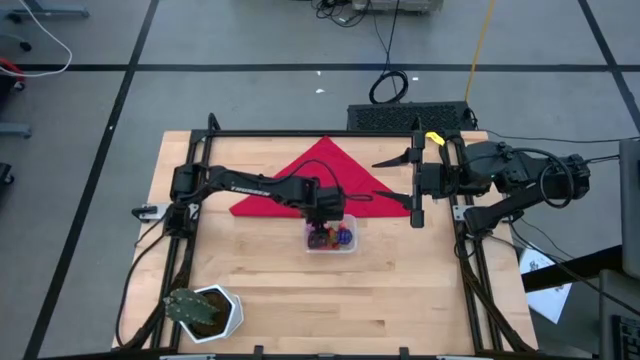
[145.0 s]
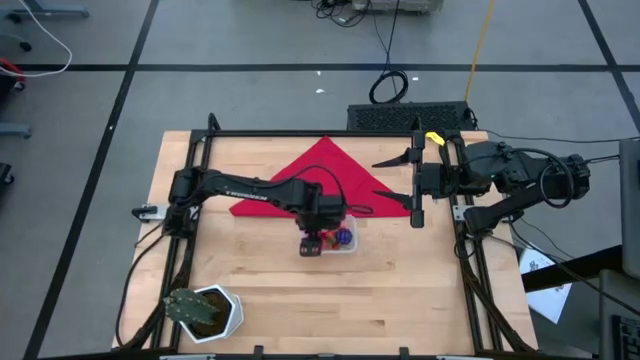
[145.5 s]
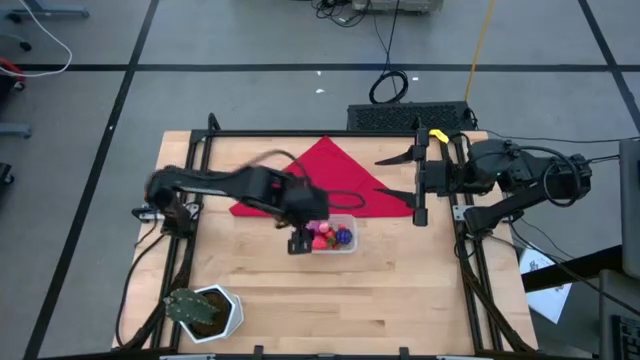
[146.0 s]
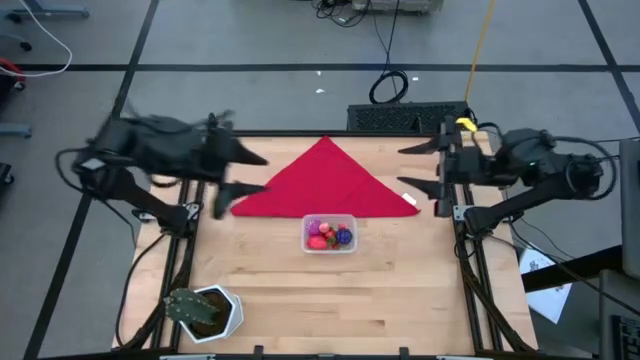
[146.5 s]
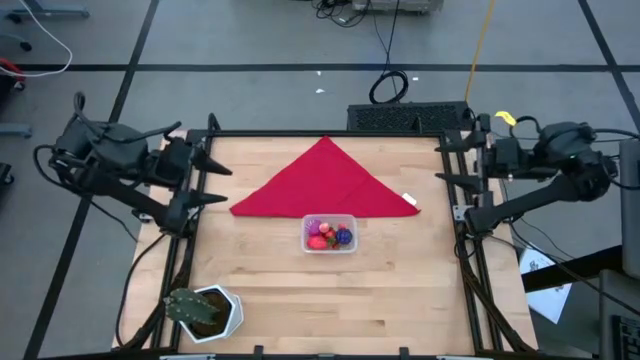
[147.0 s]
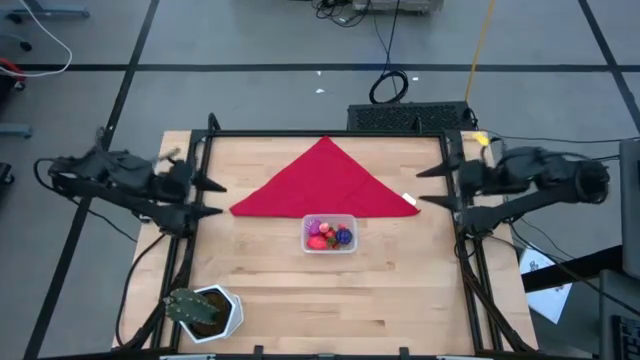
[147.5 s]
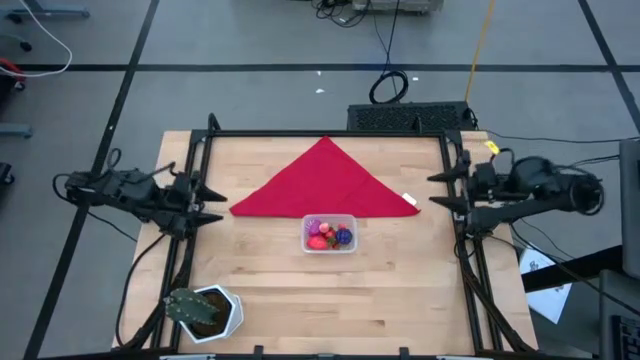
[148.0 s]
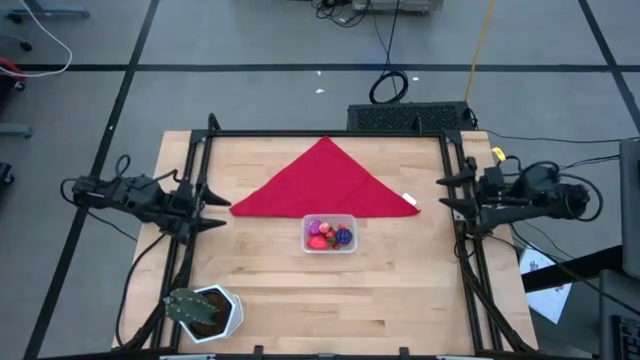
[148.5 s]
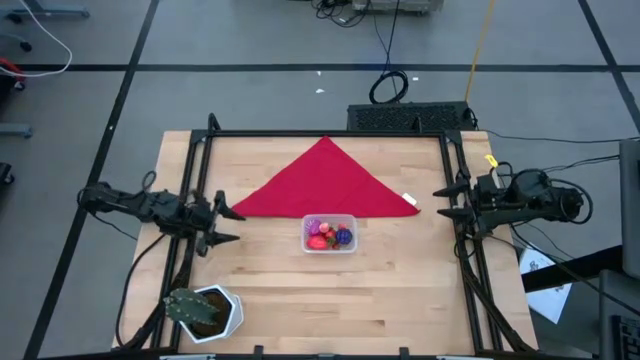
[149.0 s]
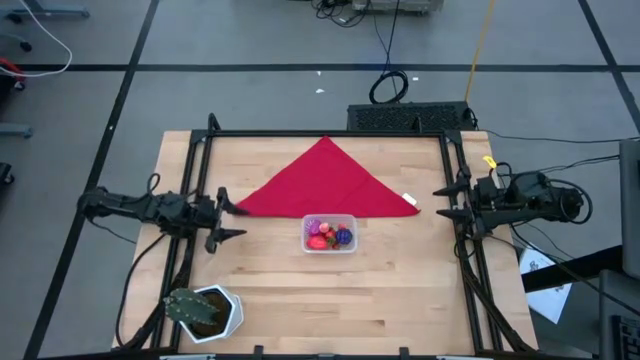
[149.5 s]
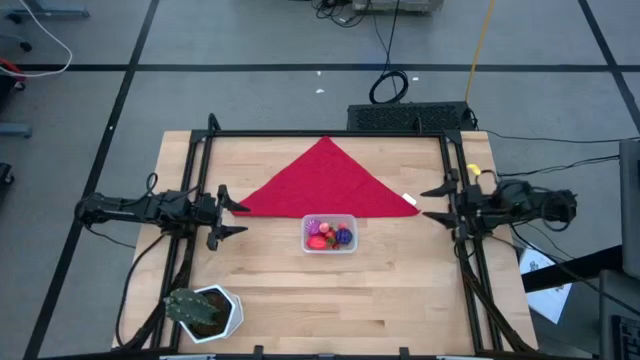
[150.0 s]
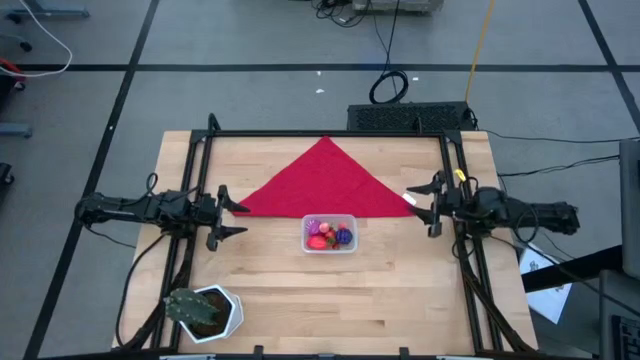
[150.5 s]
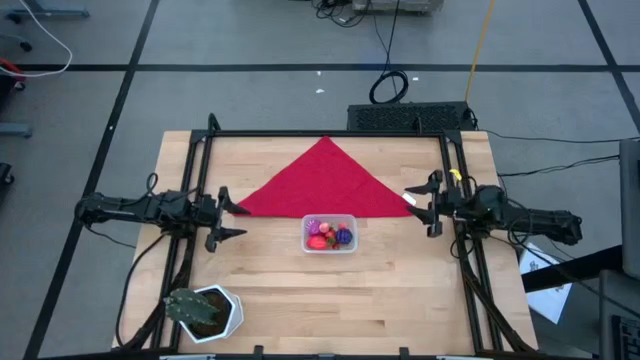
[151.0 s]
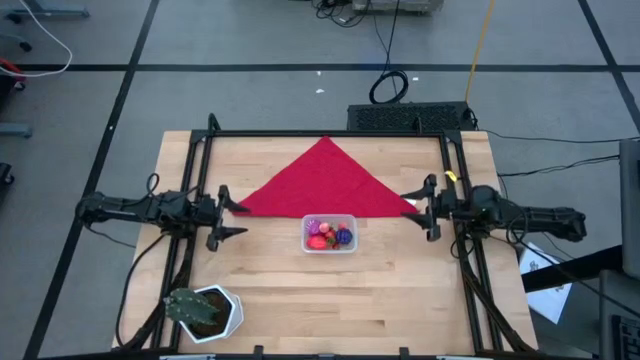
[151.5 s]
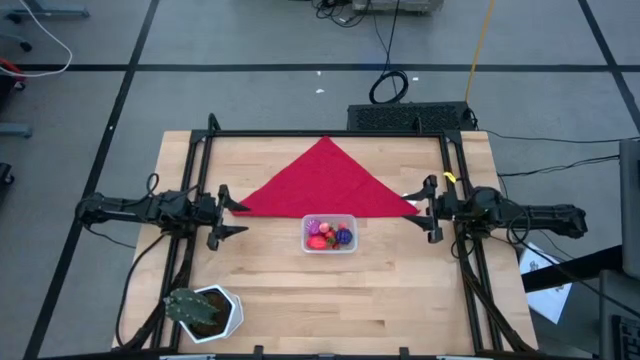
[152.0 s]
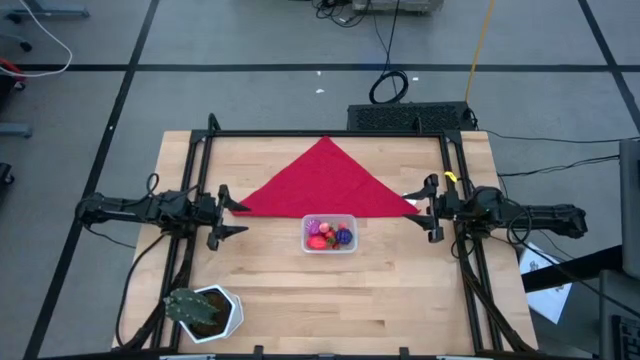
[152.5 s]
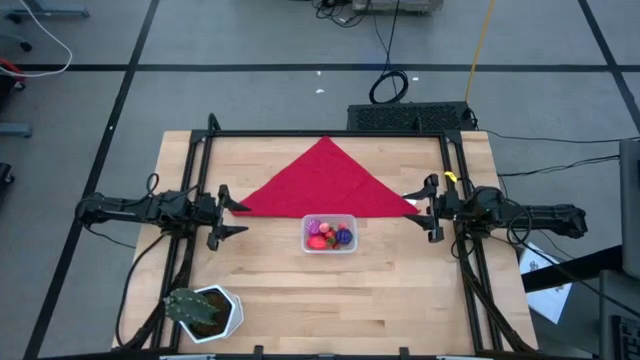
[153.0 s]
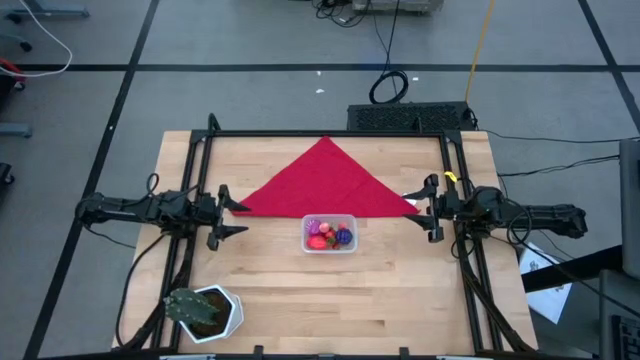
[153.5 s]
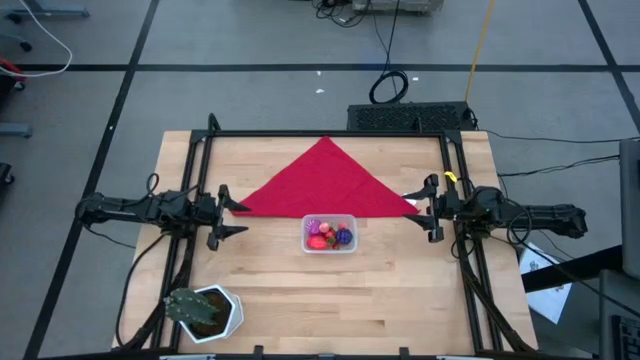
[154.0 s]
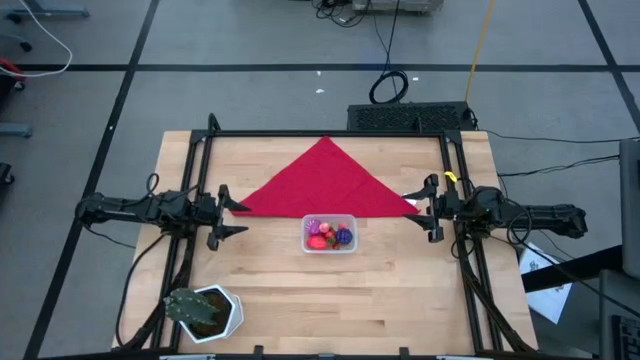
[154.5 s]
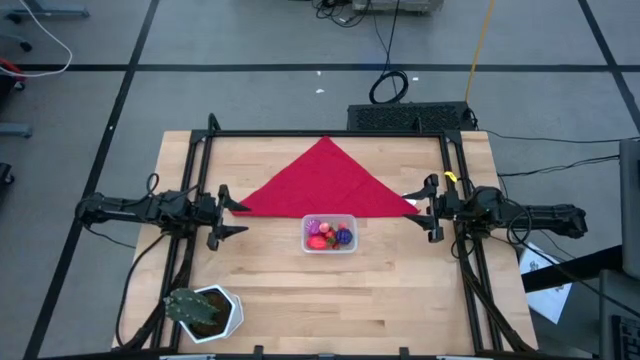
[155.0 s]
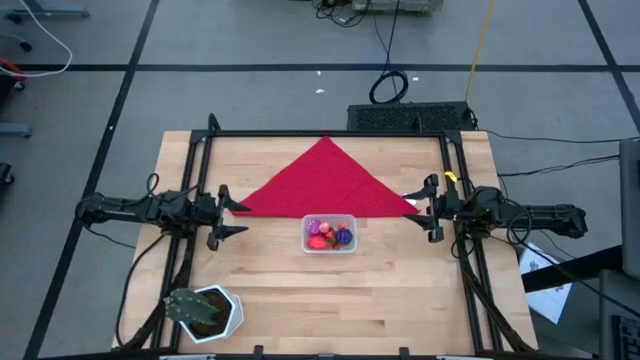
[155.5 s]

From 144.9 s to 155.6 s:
Task: Pick and placing Produce into tupperware
Return to Home Position

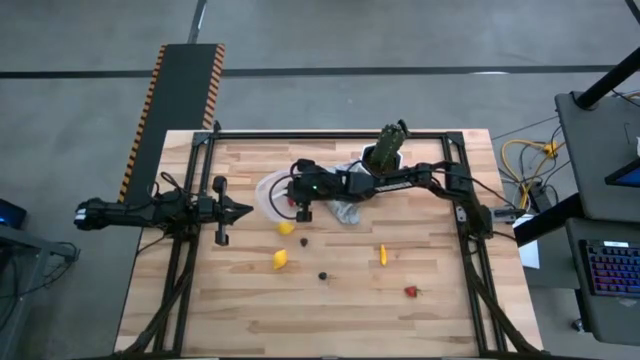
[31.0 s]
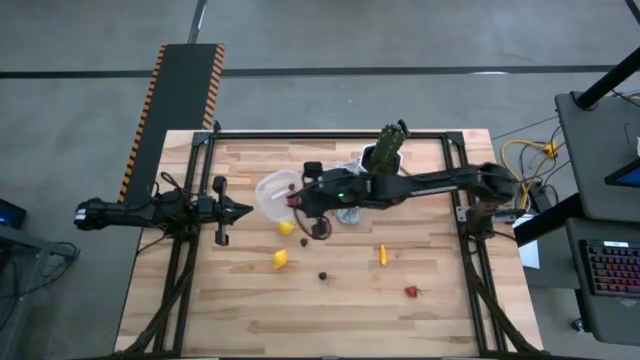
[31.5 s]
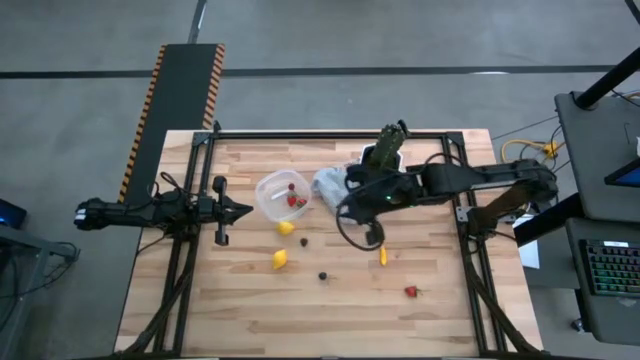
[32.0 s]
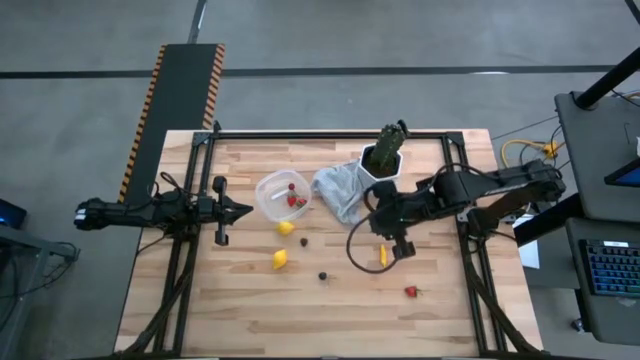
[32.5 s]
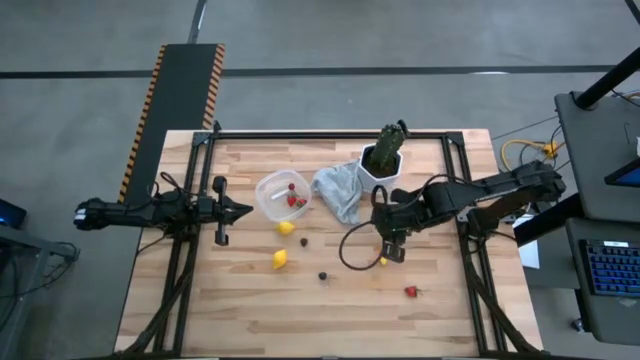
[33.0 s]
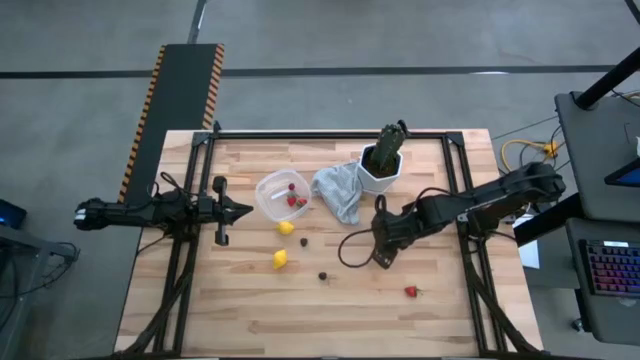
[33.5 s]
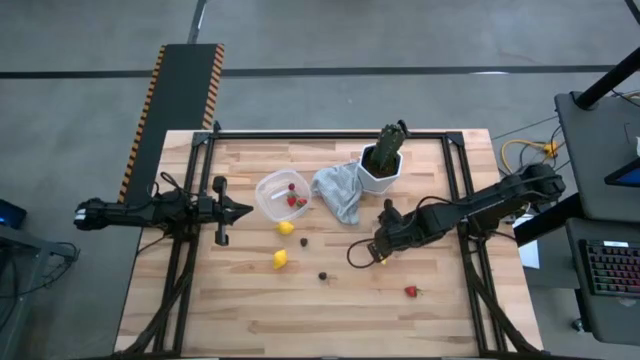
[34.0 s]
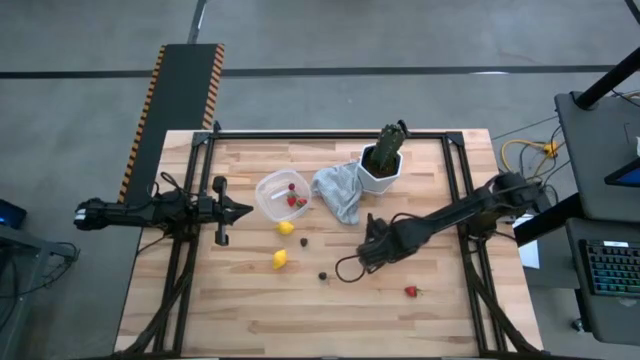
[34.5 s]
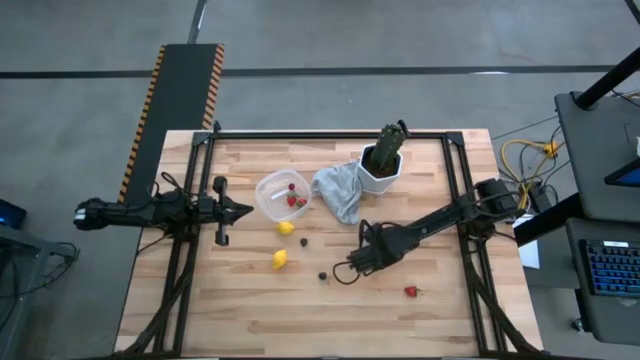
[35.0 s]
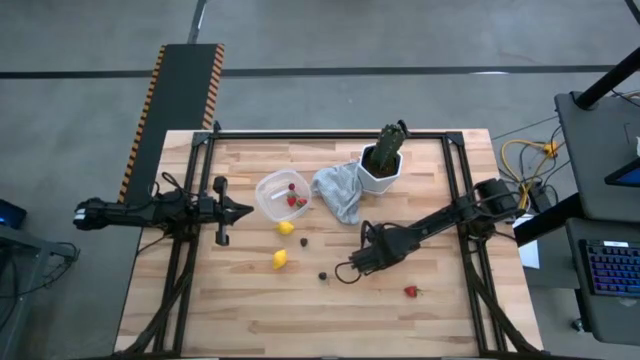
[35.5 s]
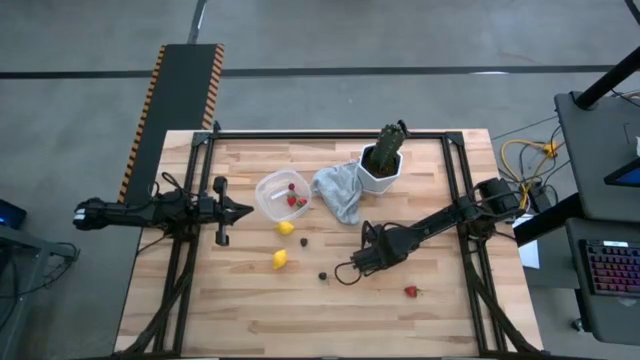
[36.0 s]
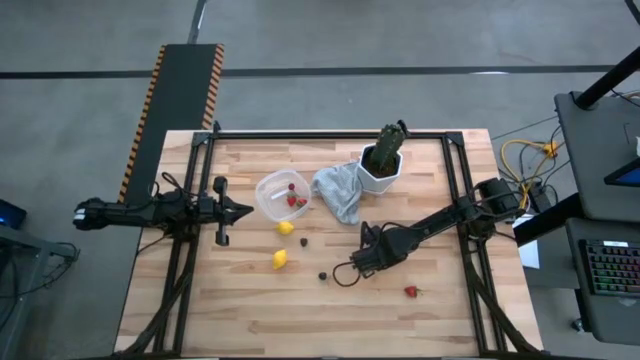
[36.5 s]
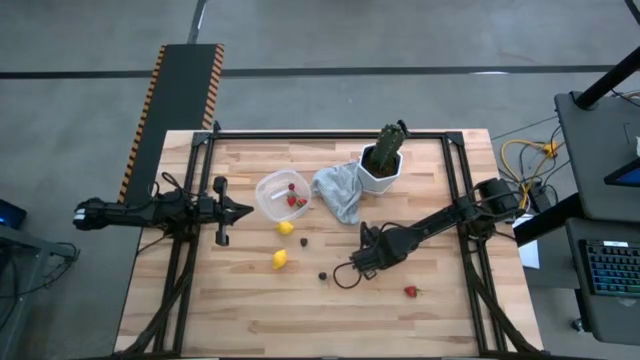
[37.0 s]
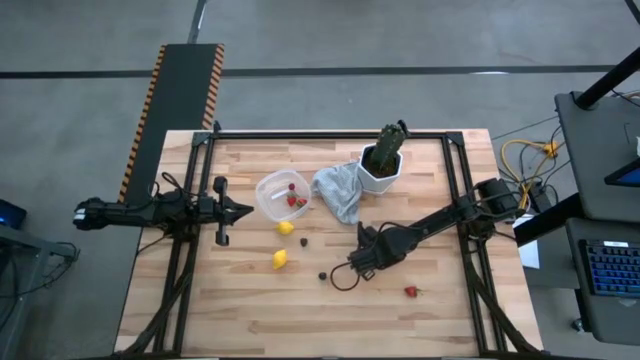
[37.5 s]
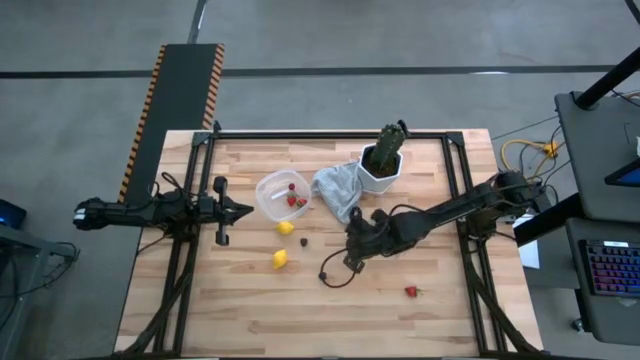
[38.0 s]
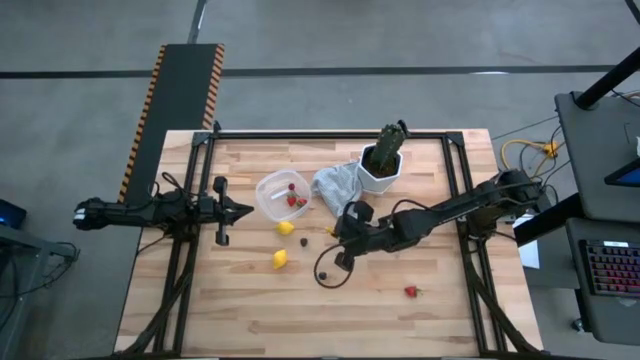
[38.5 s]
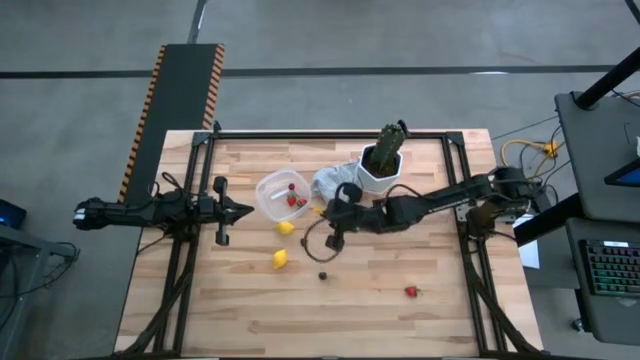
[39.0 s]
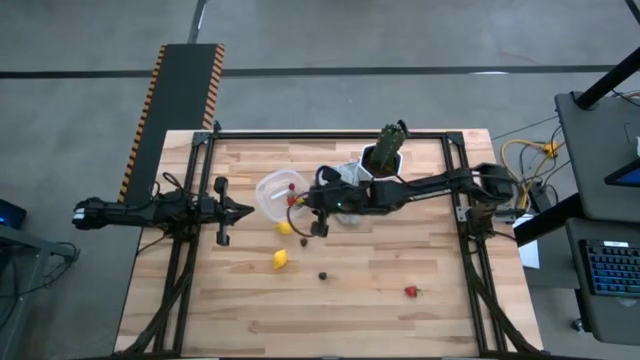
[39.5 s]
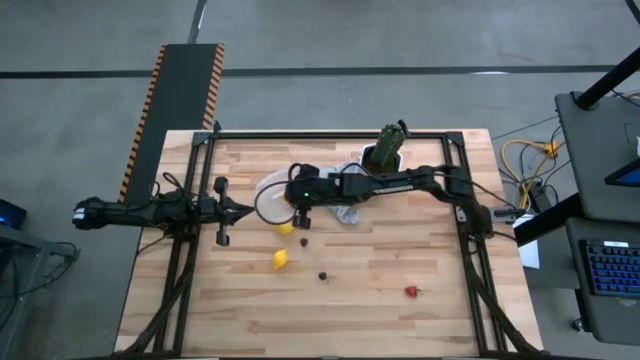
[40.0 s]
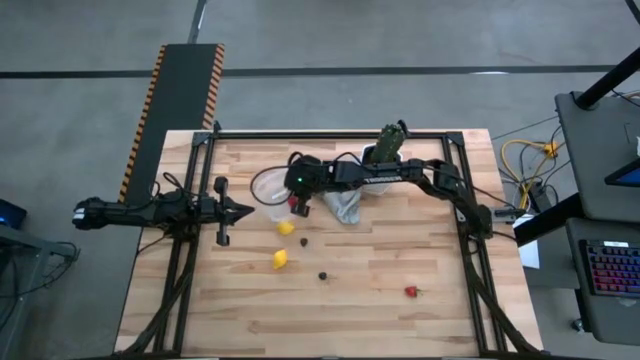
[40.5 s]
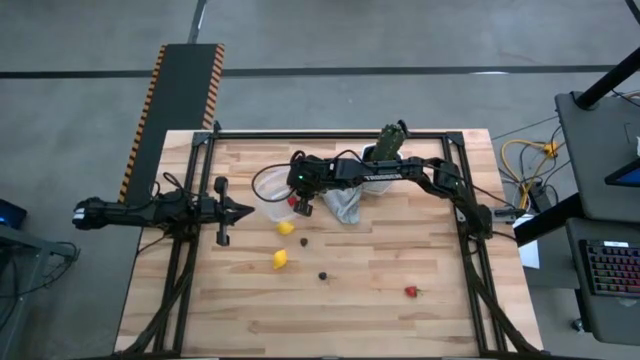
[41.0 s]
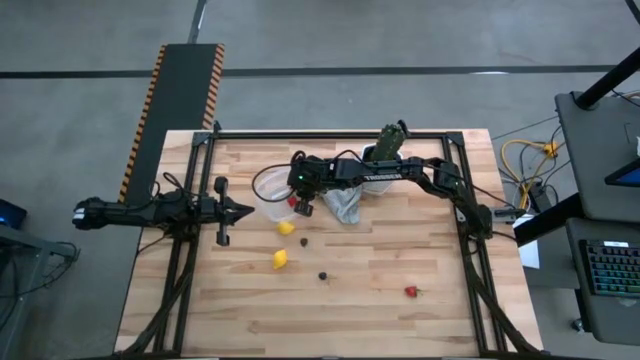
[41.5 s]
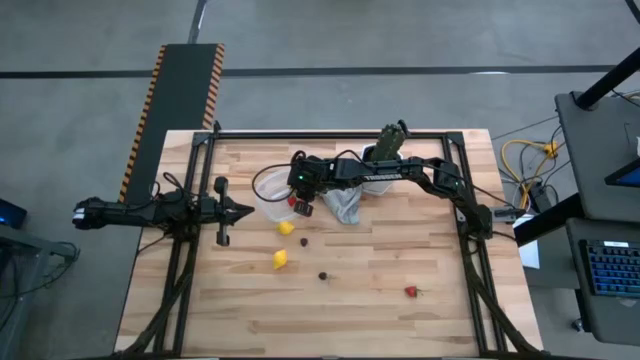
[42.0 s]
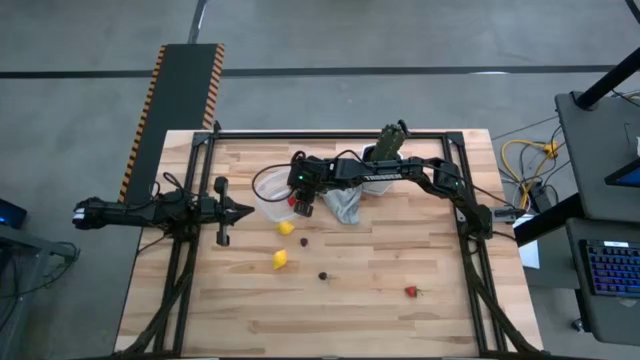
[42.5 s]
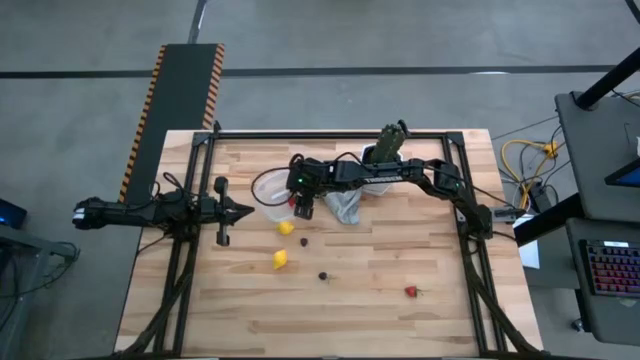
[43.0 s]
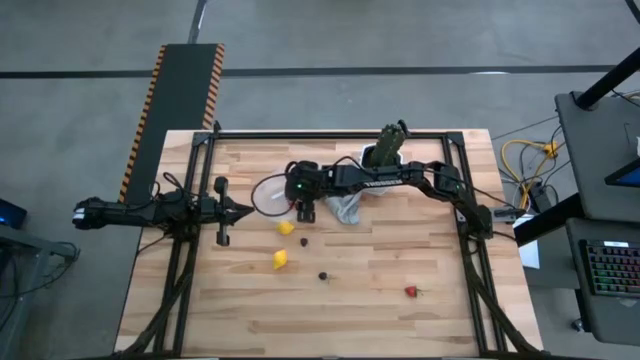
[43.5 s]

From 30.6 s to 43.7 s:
Task: Pick and placing Produce into tupperware
Put the yellow corn into the transparent container
